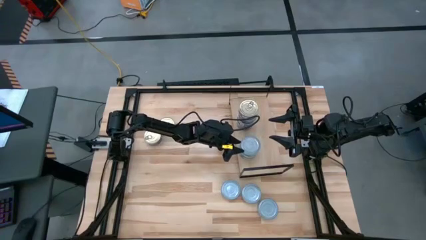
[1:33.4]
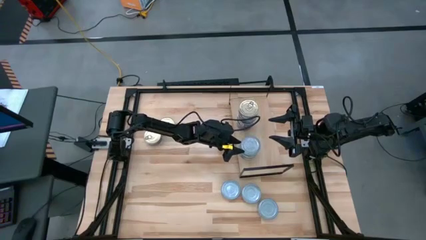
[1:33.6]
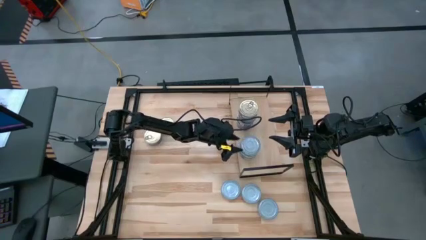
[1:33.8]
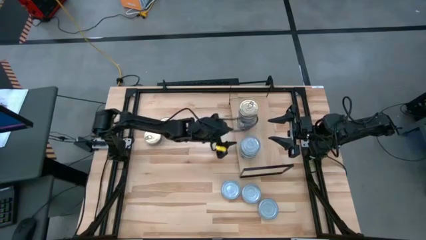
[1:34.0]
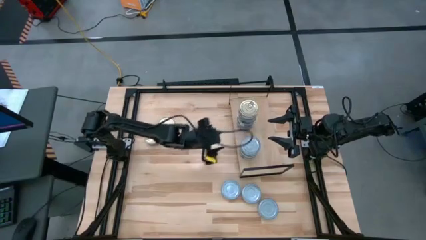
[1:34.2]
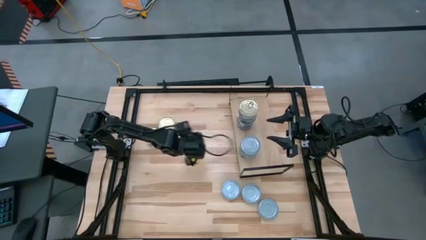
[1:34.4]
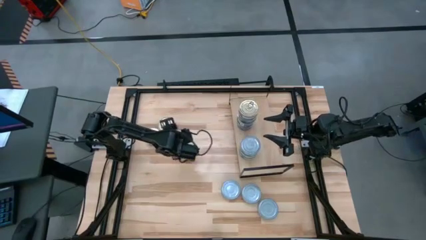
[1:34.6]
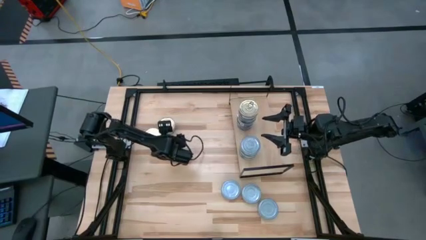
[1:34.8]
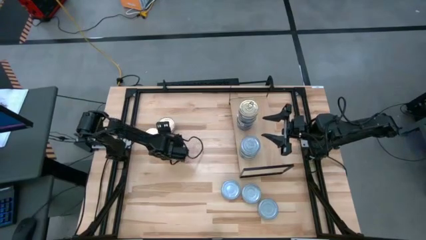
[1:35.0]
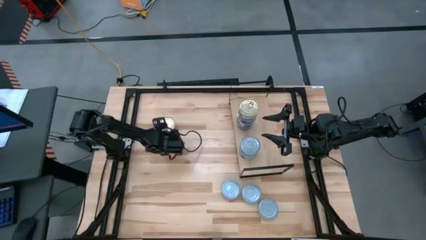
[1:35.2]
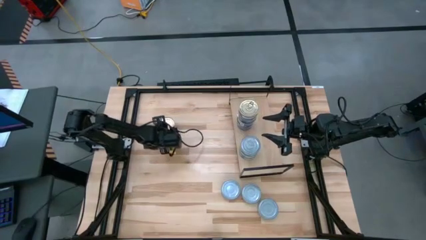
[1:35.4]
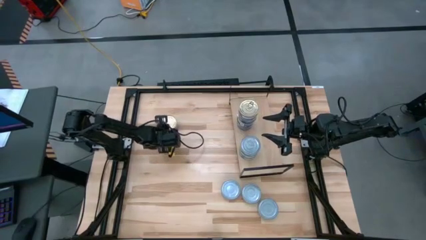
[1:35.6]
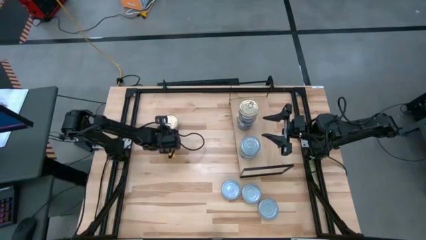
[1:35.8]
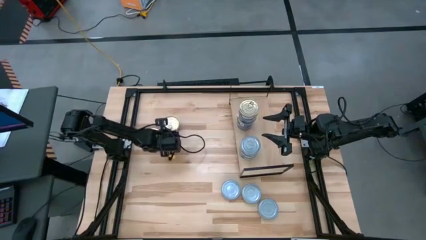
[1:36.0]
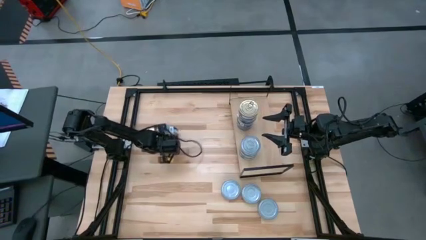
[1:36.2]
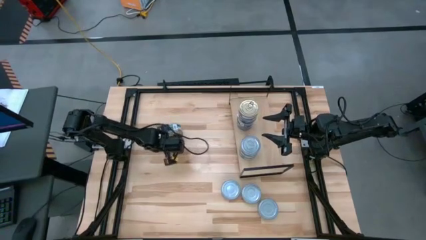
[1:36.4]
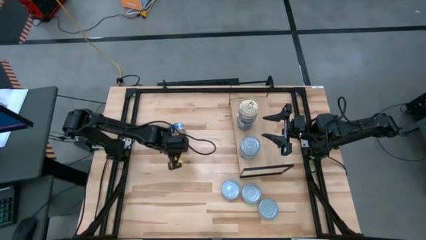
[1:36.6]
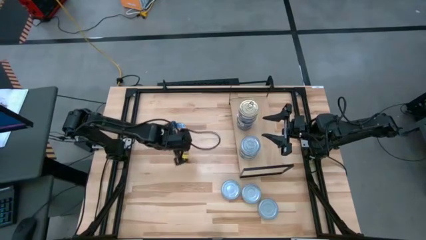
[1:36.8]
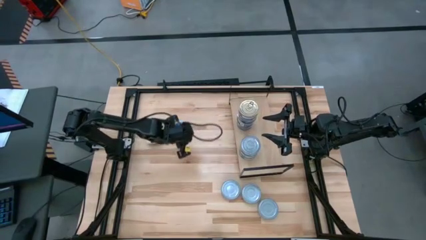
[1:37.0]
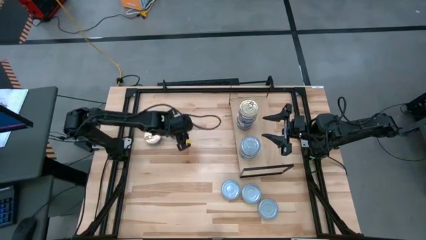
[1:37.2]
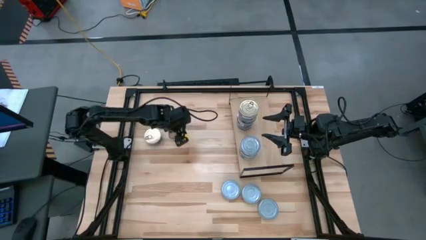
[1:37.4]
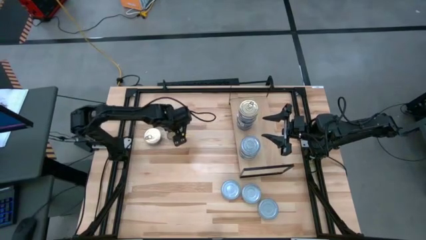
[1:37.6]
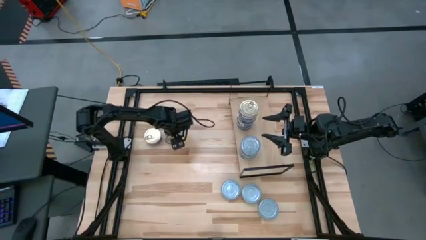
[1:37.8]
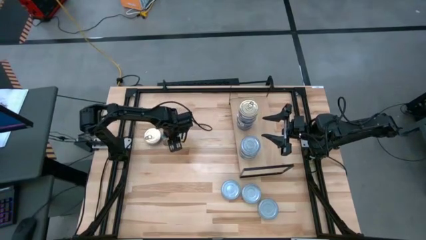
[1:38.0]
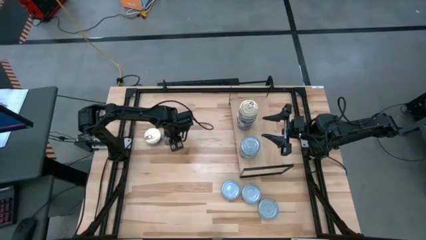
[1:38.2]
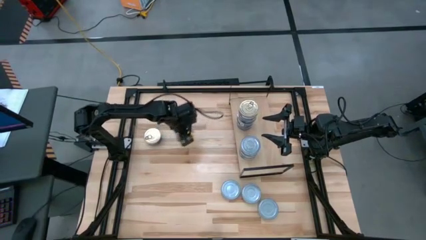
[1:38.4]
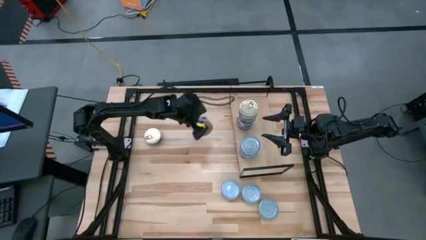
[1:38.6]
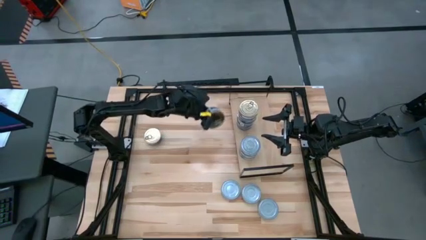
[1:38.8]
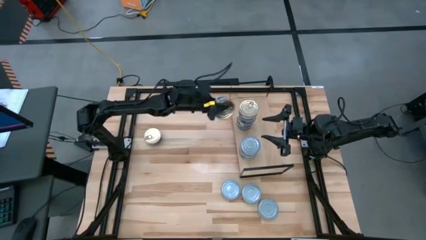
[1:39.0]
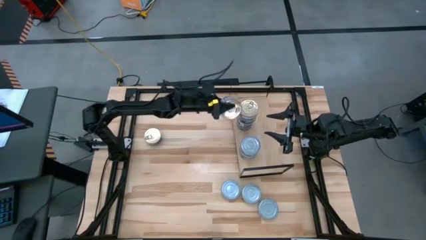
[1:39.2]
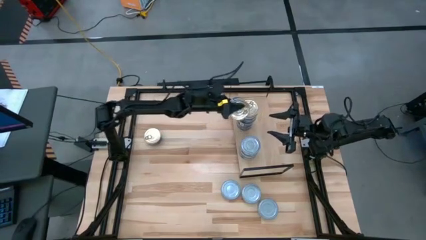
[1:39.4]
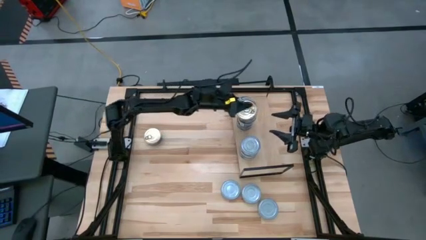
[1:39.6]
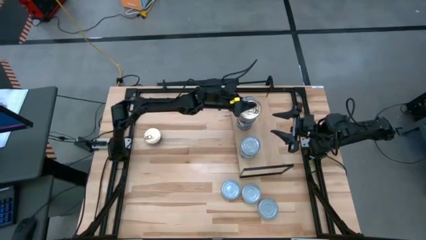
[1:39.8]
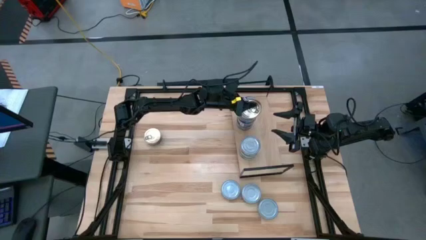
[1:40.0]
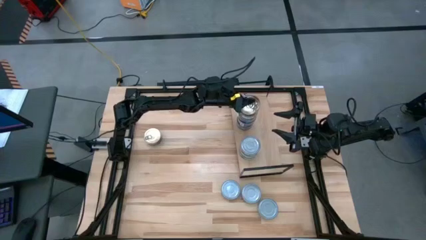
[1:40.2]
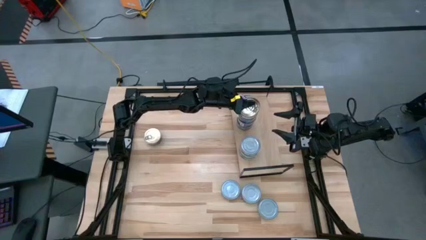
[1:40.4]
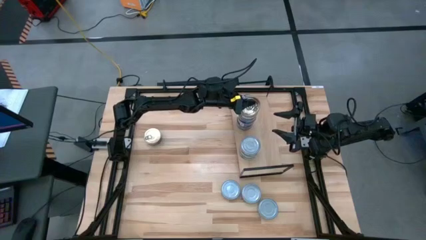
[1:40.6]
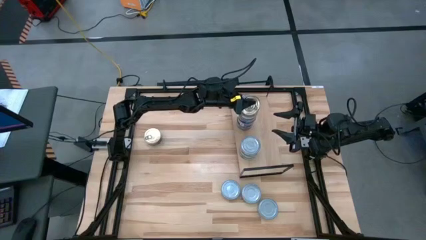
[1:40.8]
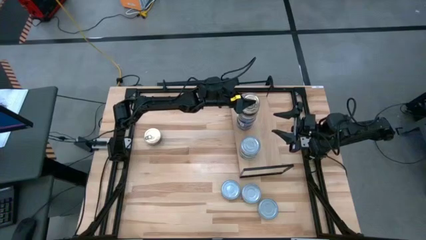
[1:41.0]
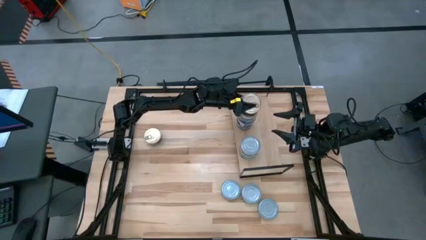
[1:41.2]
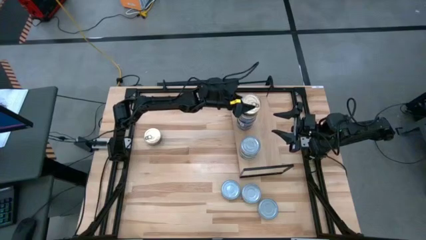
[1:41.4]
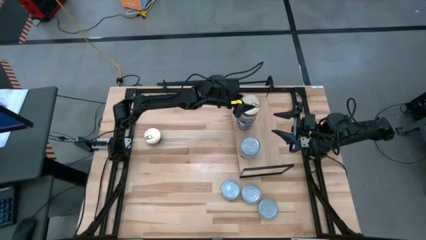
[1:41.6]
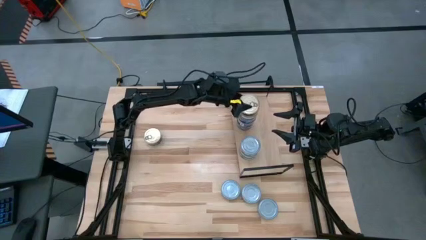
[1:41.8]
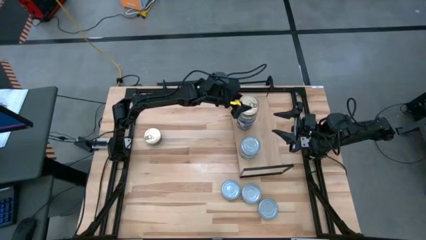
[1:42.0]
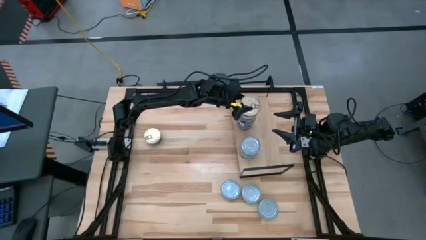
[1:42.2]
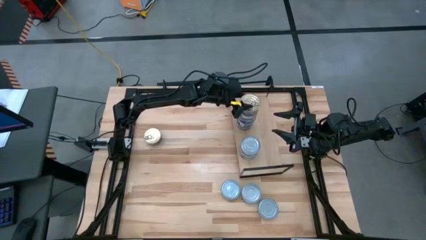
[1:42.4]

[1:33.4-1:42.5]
Task: Stack canned seafood by type on shelf
Stack the blue-pink tuna can on top of the other blue-pink tuna can on the shelf

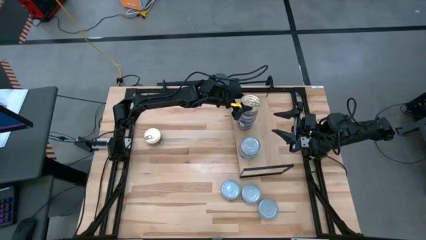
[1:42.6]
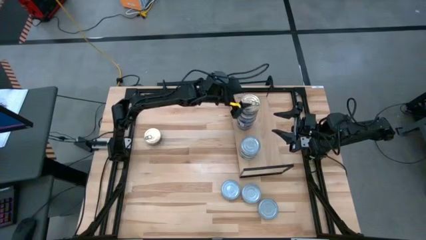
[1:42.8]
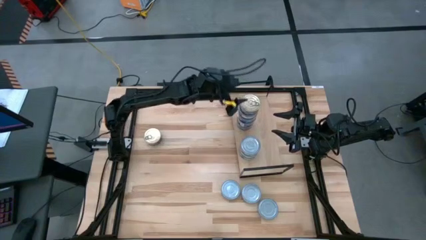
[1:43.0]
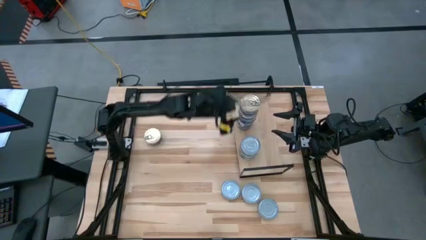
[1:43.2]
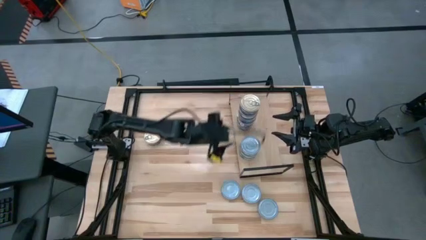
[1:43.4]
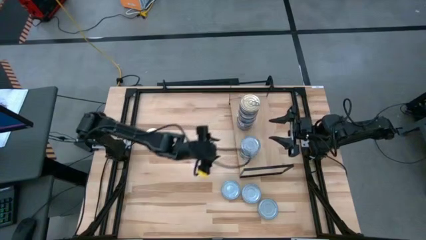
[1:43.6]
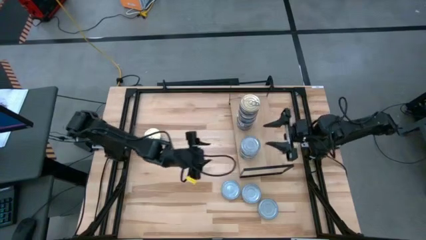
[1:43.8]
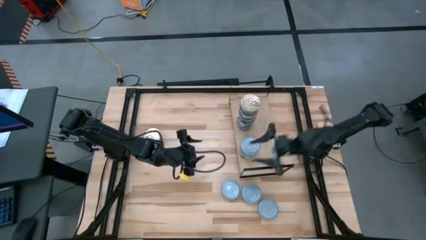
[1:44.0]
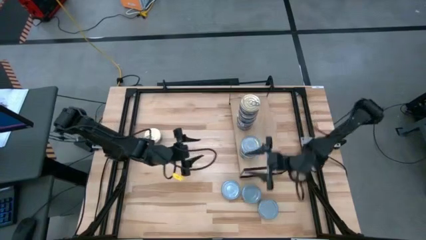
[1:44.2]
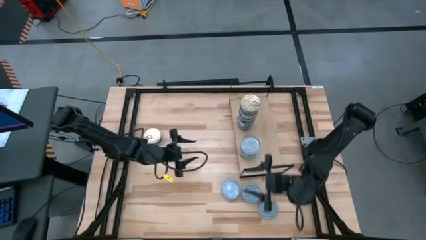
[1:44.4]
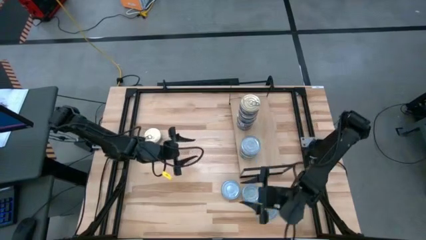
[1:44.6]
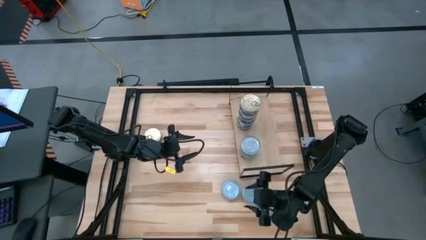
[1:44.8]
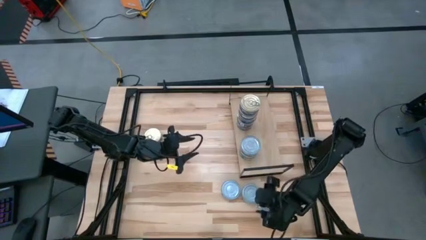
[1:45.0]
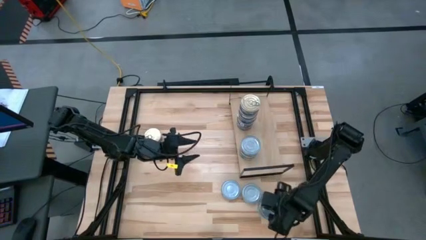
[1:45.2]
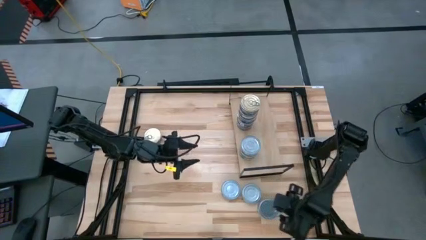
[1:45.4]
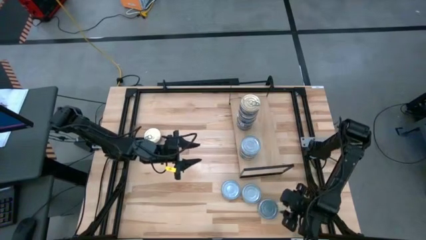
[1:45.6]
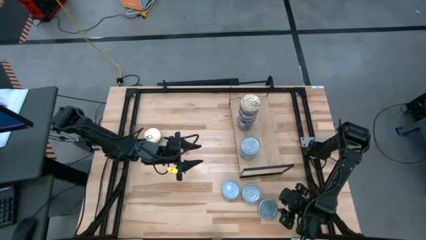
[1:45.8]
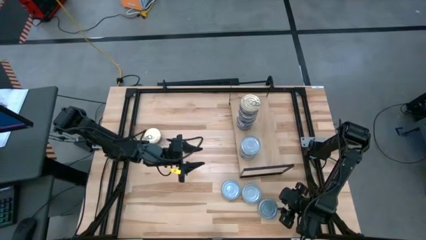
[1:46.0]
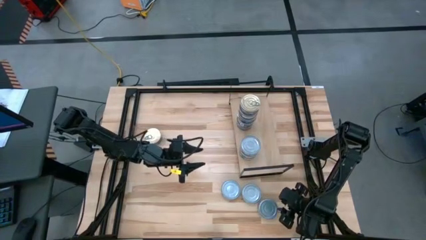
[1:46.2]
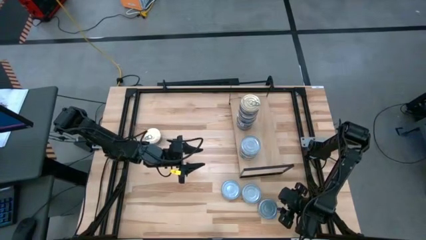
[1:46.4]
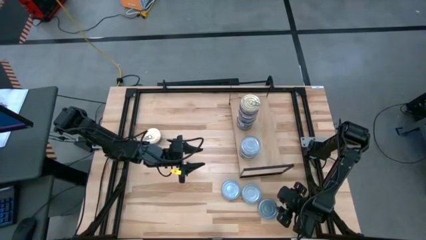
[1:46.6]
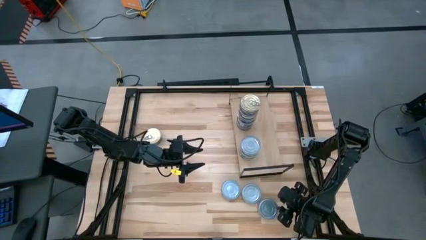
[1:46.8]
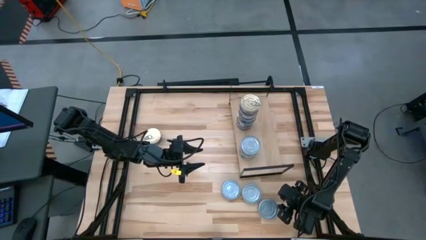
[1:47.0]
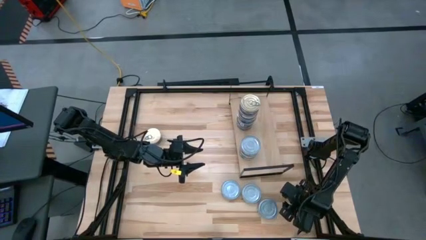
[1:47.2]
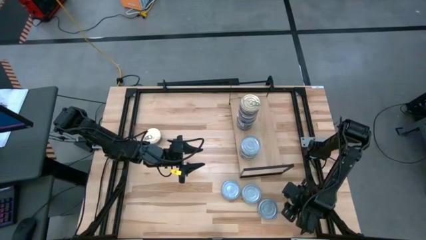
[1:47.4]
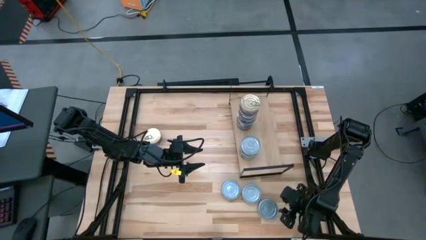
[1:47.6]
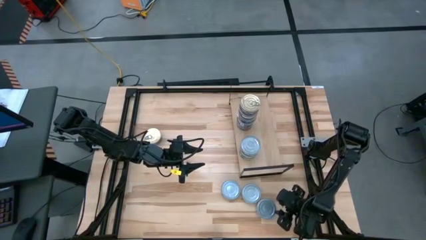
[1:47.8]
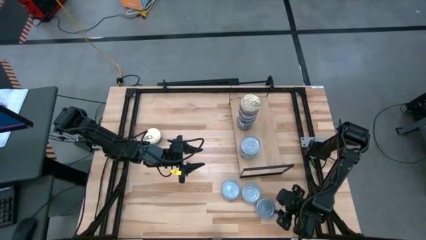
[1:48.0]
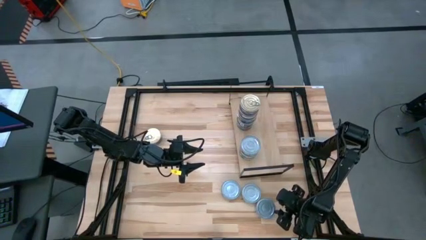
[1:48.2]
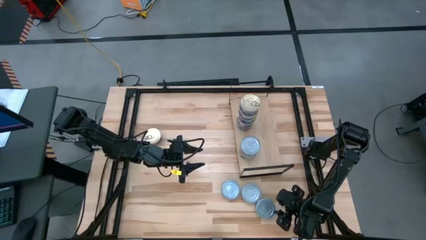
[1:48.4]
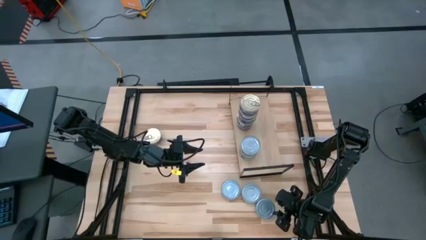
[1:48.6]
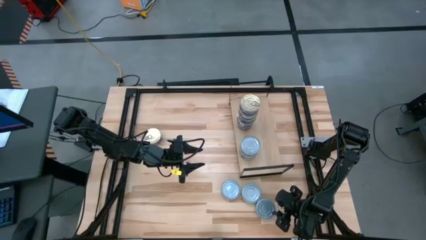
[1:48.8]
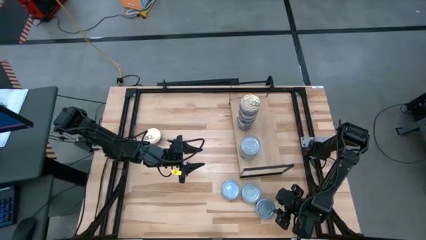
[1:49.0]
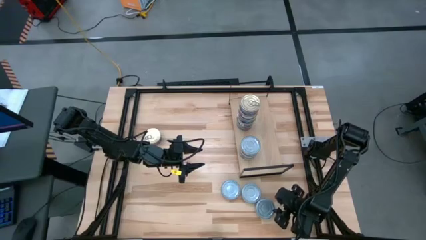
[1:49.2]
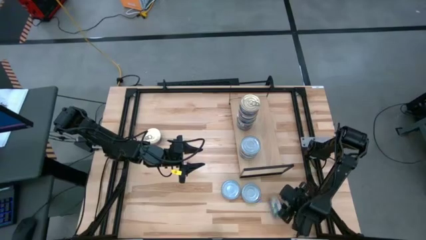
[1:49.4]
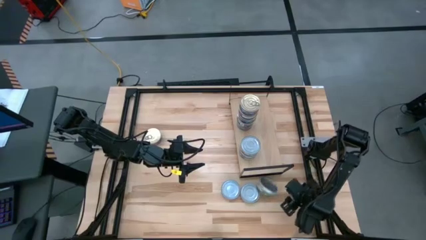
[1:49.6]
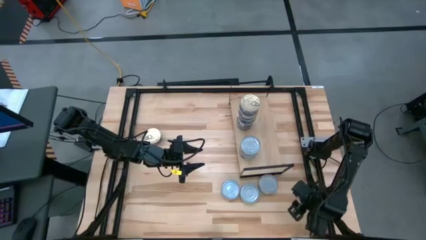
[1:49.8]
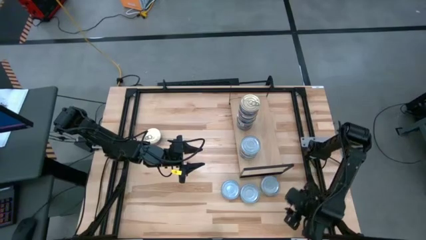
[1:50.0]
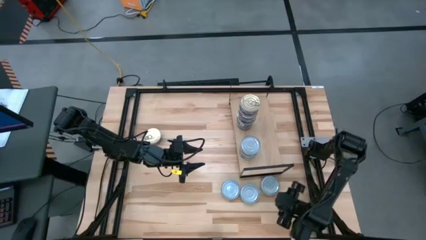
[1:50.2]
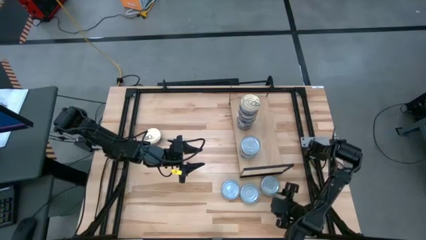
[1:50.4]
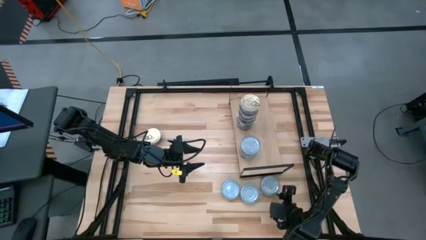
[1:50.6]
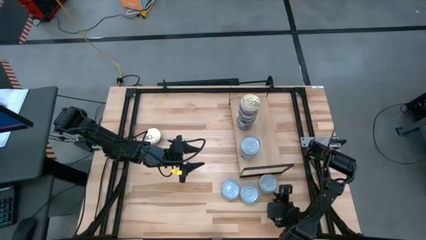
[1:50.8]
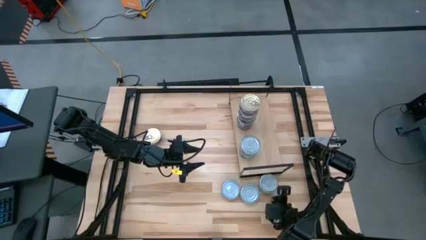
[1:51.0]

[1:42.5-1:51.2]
Stack the green tuna can on top of the other green tuna can on the shelf
